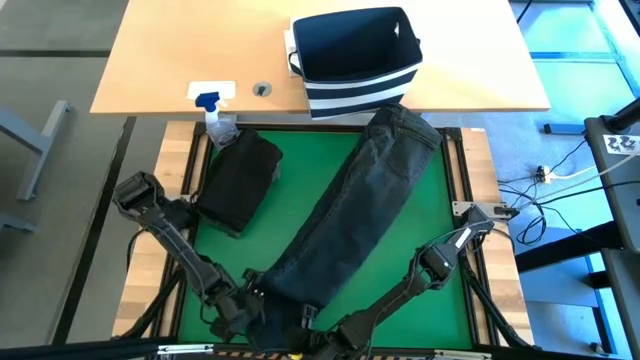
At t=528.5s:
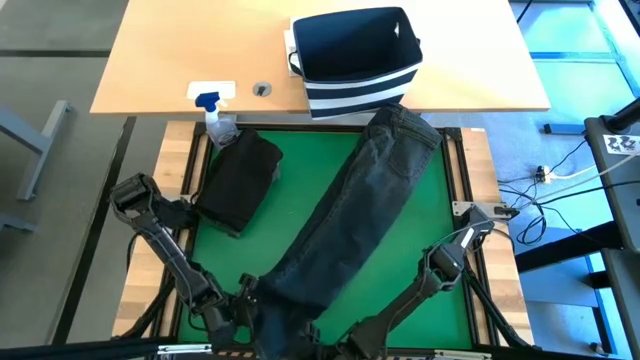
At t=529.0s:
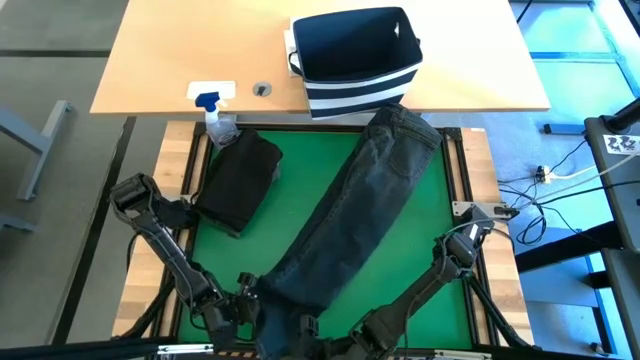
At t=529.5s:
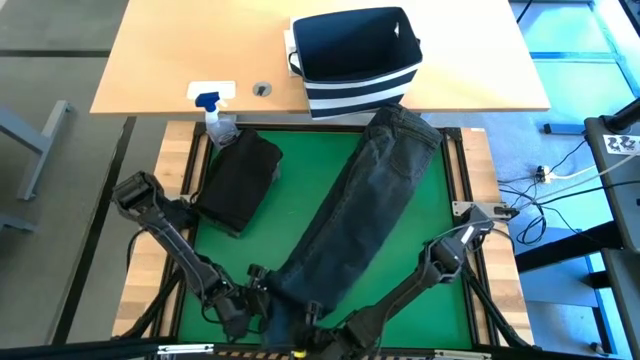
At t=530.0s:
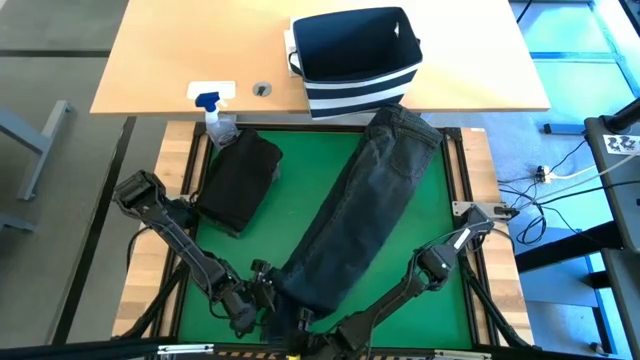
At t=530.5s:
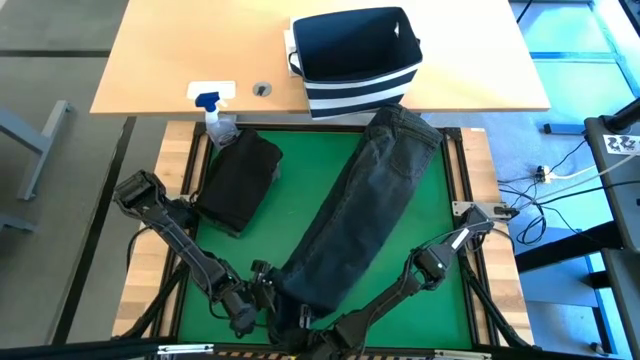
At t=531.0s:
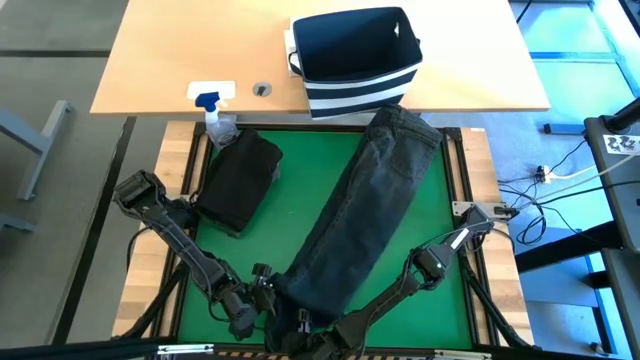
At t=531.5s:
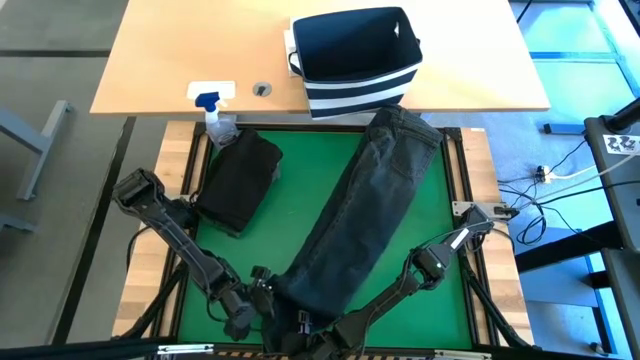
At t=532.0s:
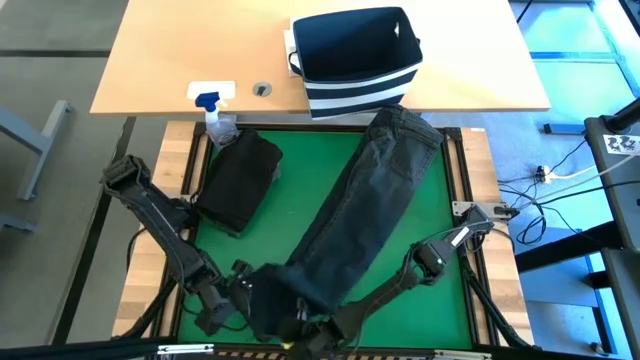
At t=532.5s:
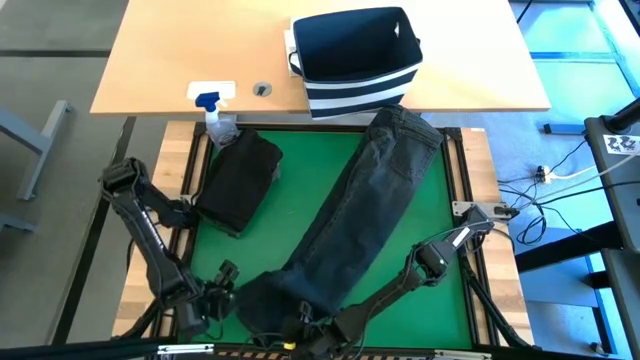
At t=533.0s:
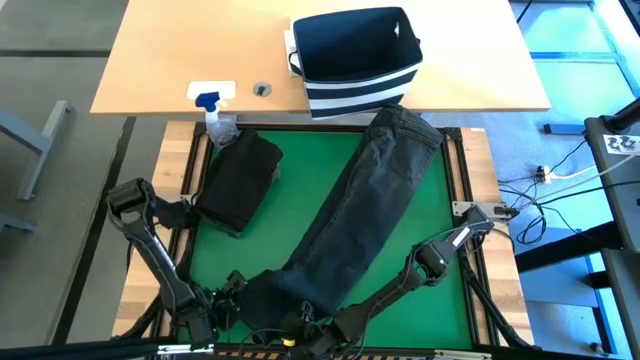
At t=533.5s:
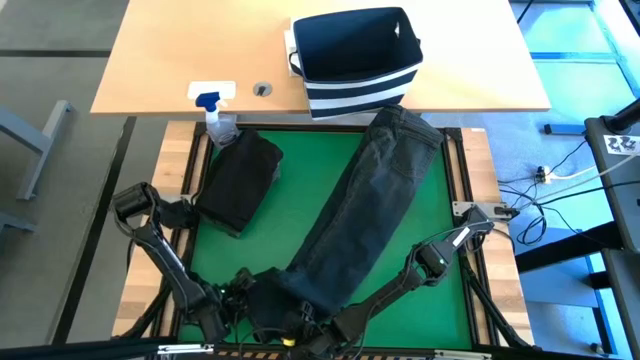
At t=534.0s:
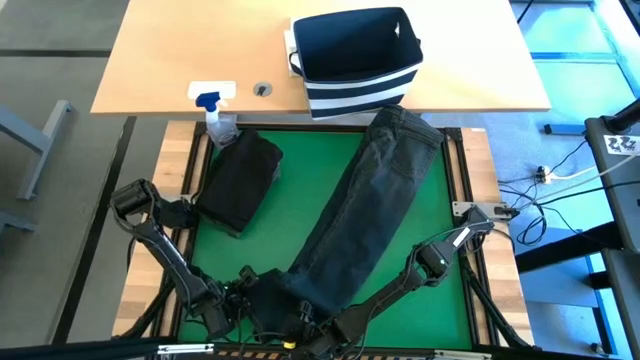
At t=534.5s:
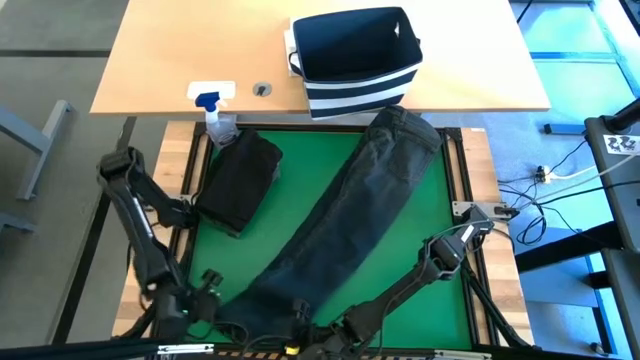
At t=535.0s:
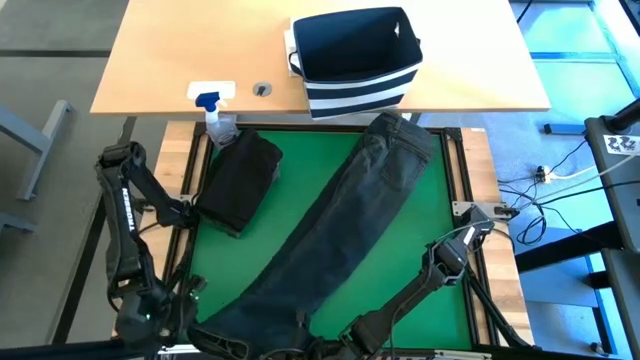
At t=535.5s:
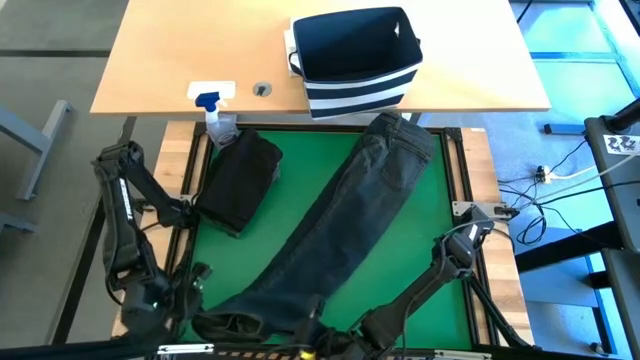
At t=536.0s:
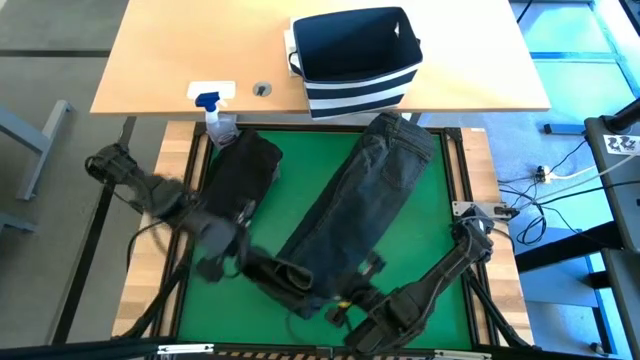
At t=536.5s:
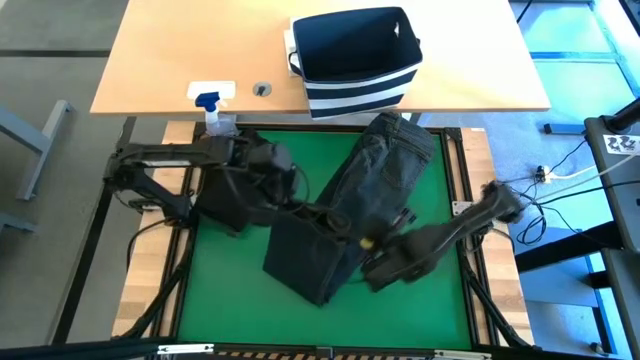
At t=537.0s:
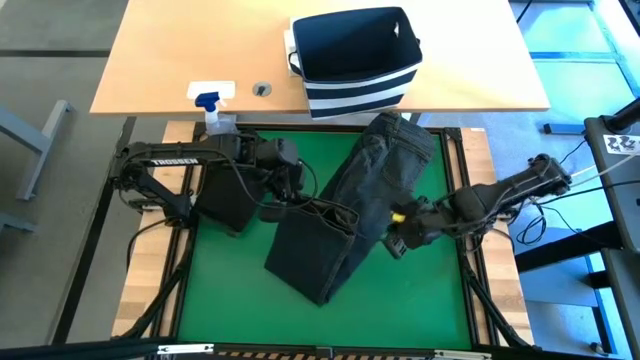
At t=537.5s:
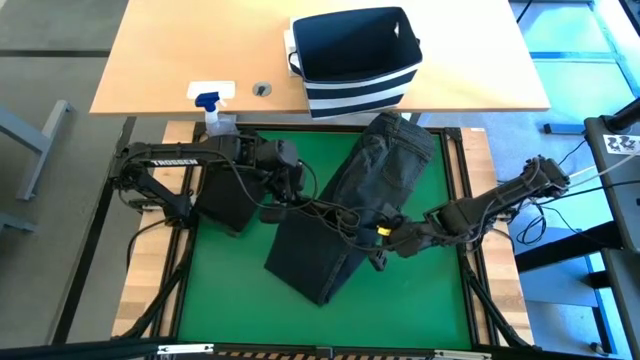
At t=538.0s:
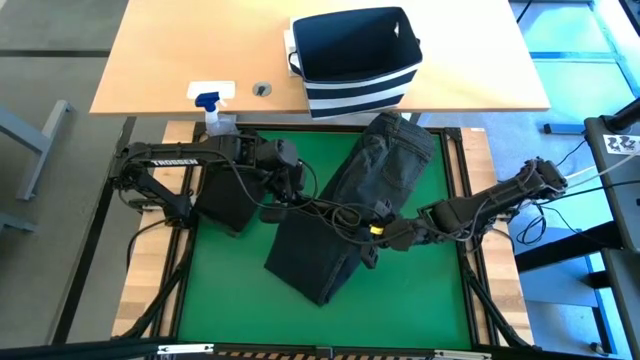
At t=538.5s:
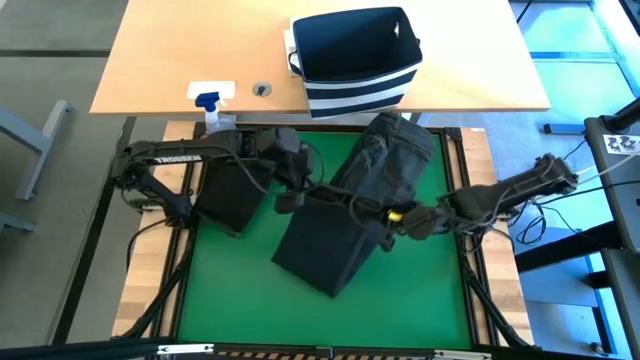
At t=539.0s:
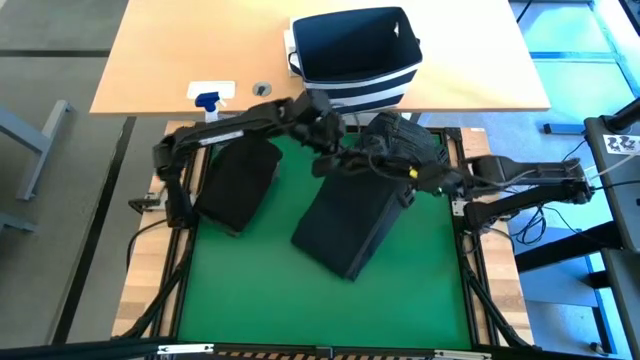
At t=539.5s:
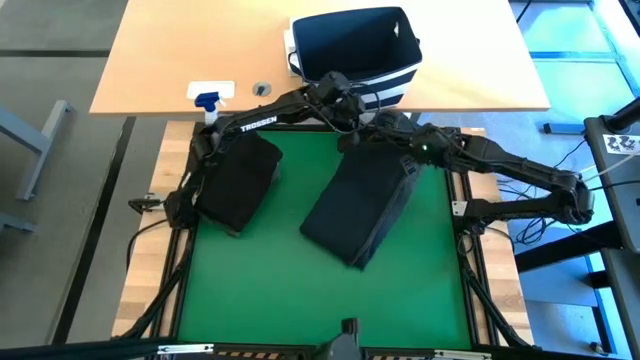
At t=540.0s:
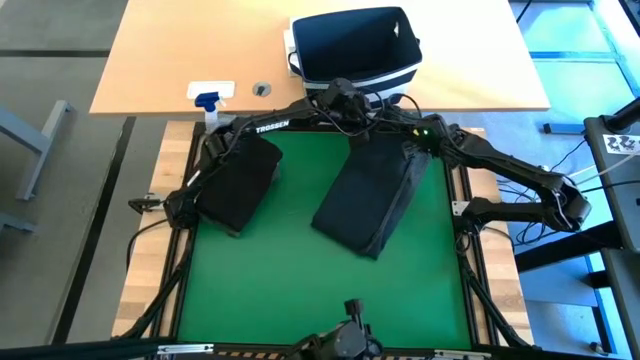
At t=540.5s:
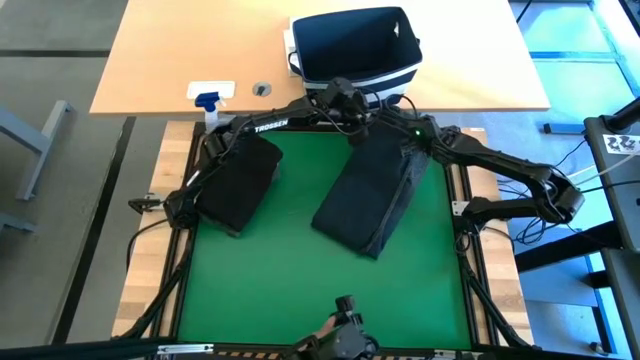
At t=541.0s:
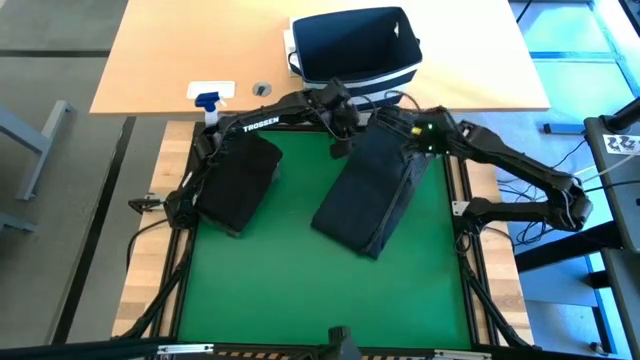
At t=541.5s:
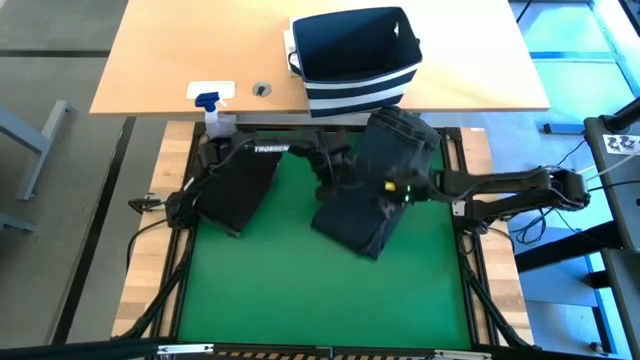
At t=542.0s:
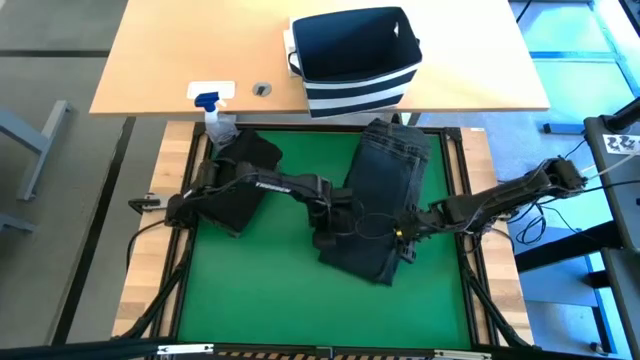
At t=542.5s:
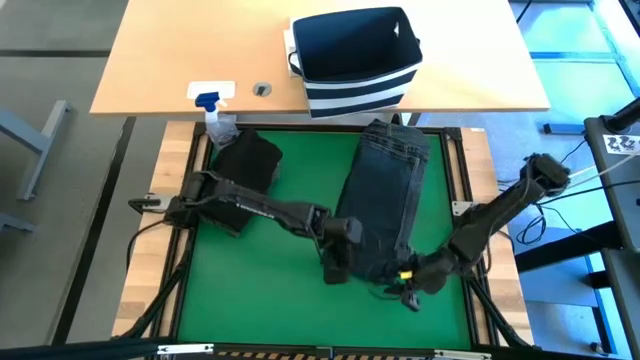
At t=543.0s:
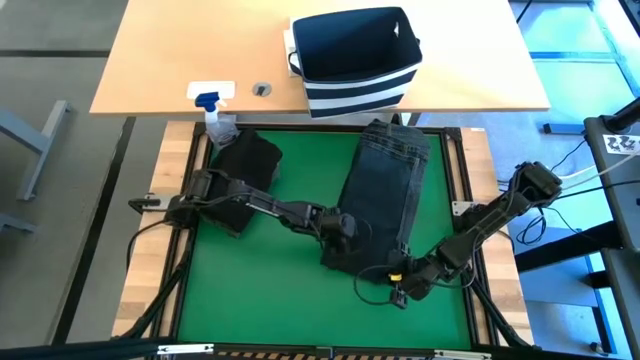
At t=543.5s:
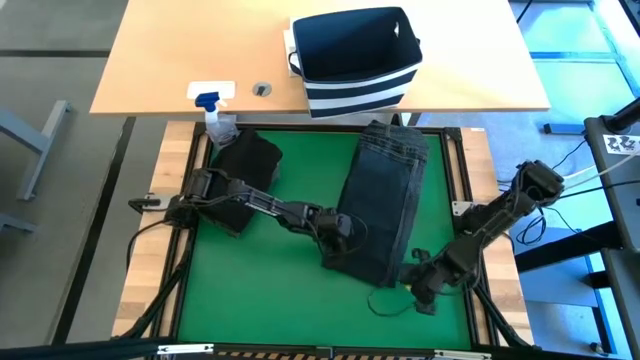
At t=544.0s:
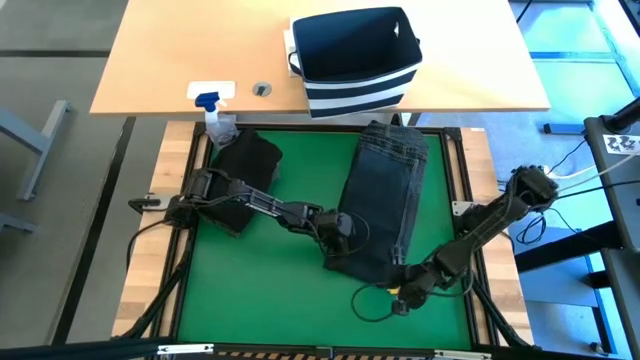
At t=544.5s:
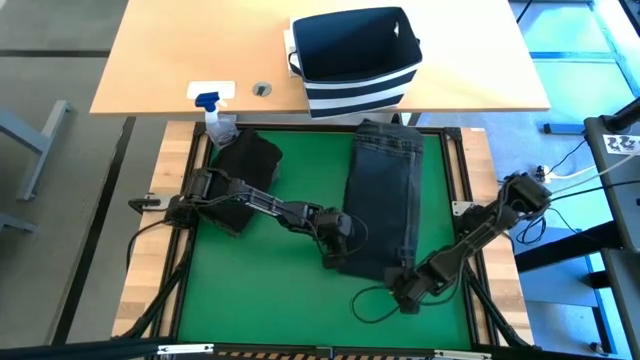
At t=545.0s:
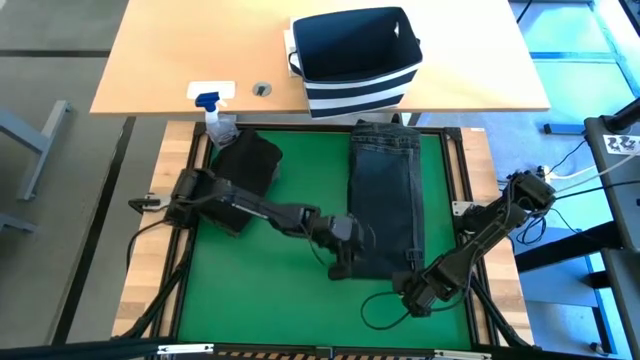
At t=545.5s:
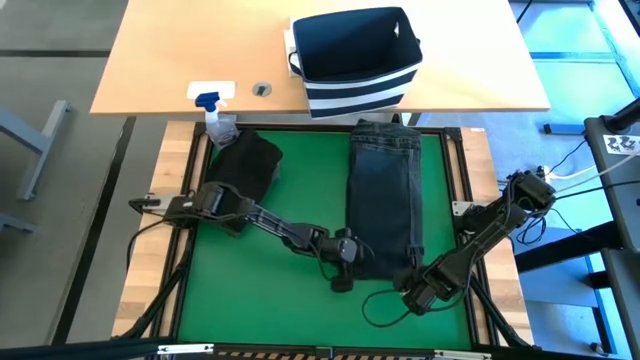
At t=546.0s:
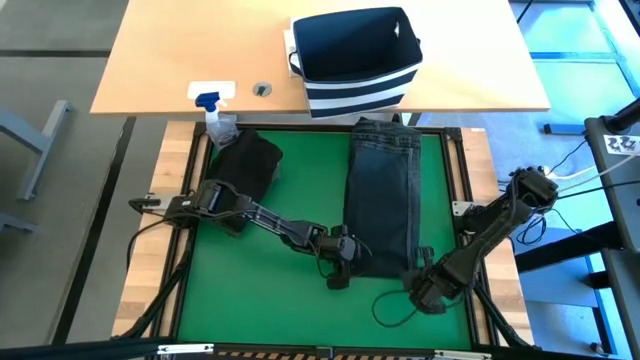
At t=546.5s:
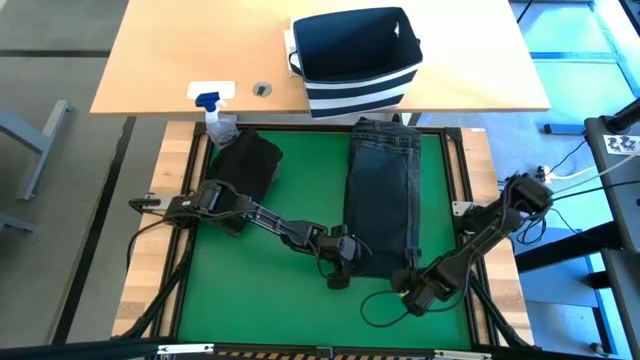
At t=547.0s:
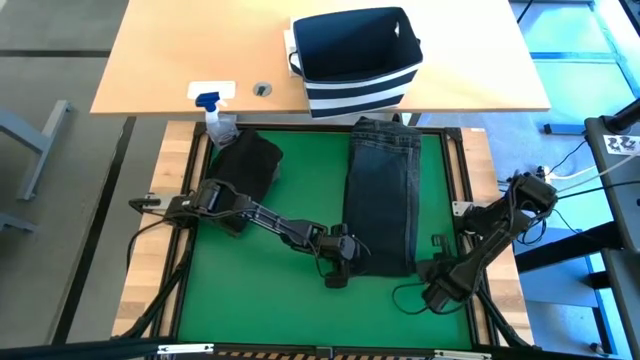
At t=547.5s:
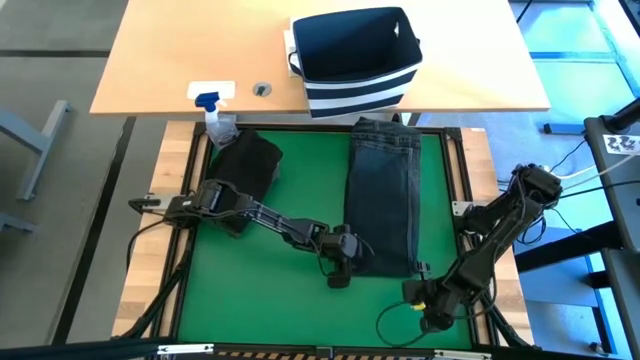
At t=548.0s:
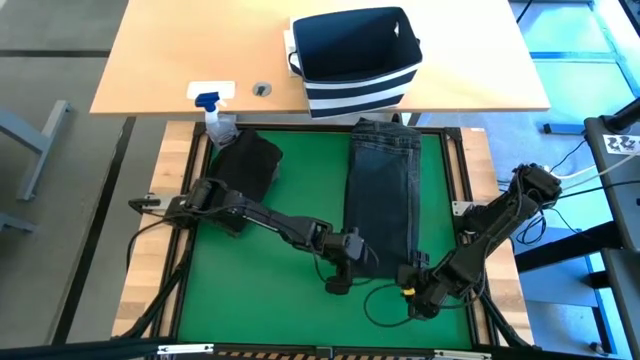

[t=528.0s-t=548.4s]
Task: Fold Laundry from Bin
Fold the blue pants
